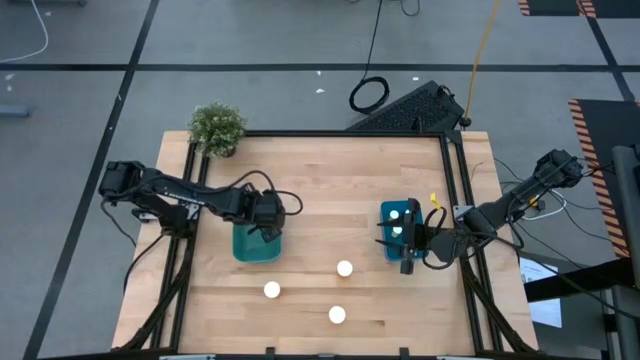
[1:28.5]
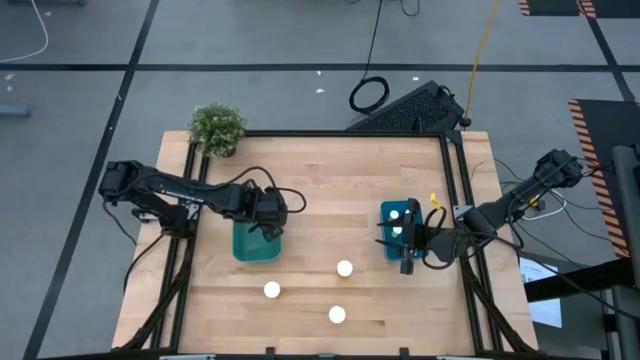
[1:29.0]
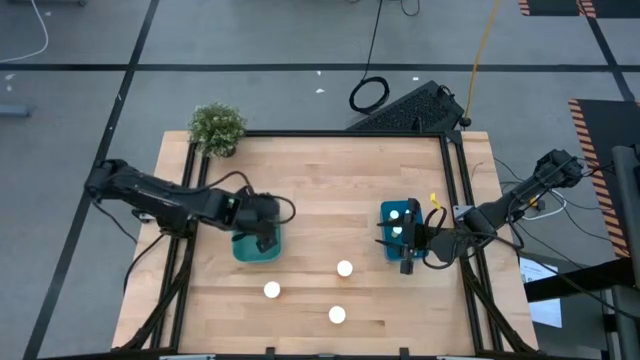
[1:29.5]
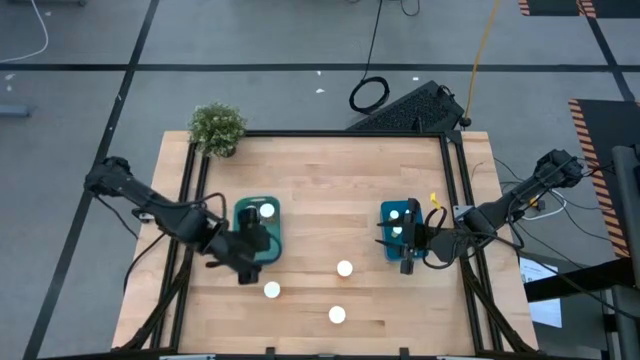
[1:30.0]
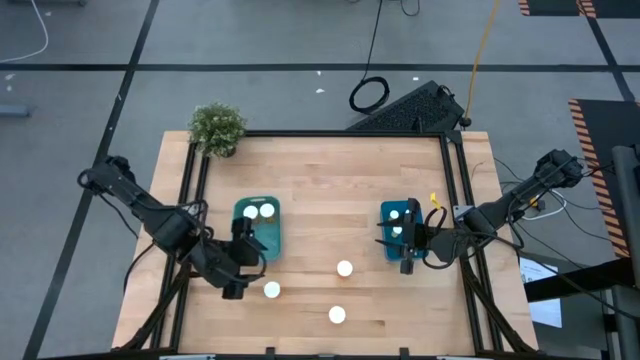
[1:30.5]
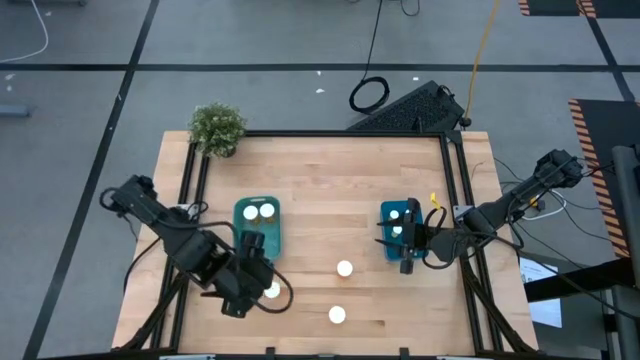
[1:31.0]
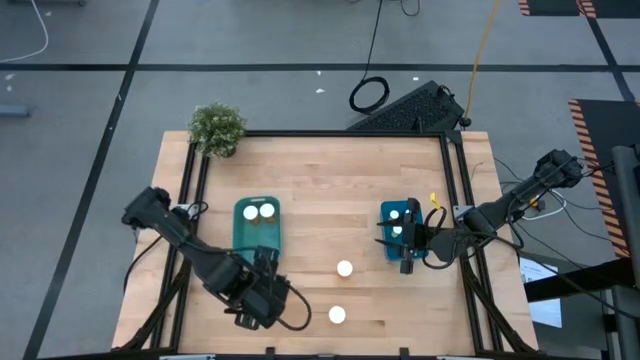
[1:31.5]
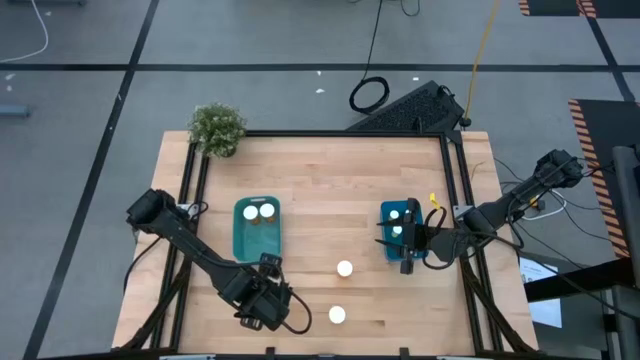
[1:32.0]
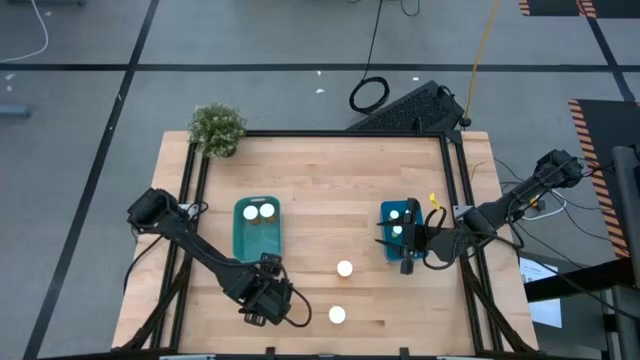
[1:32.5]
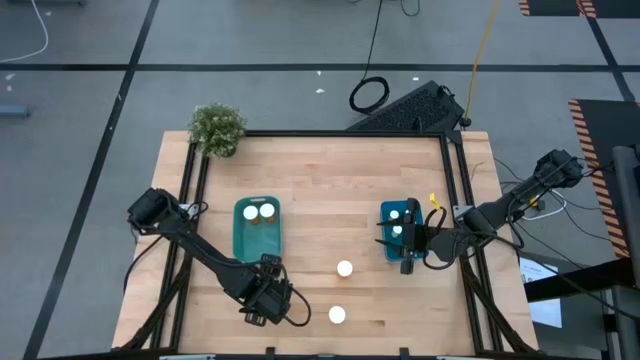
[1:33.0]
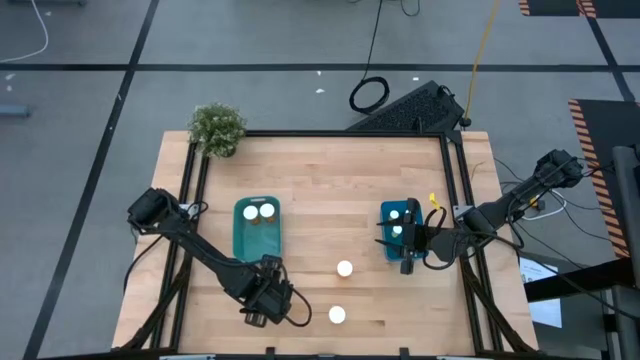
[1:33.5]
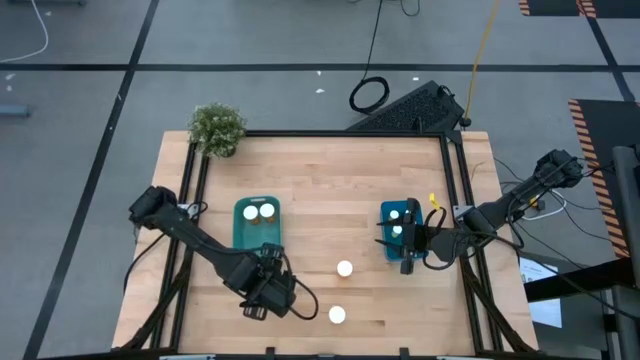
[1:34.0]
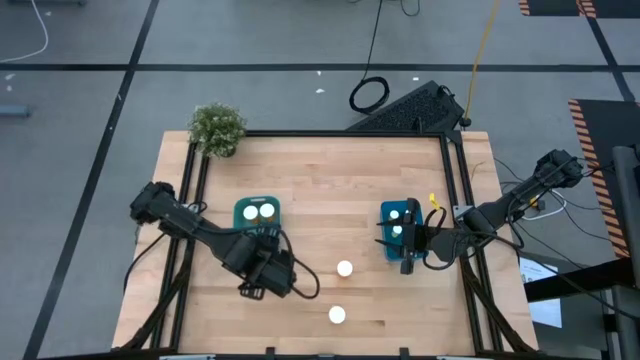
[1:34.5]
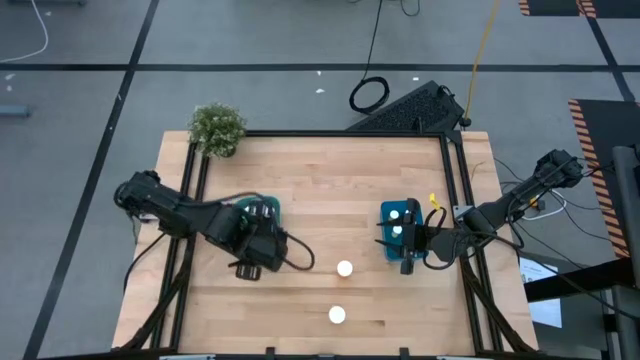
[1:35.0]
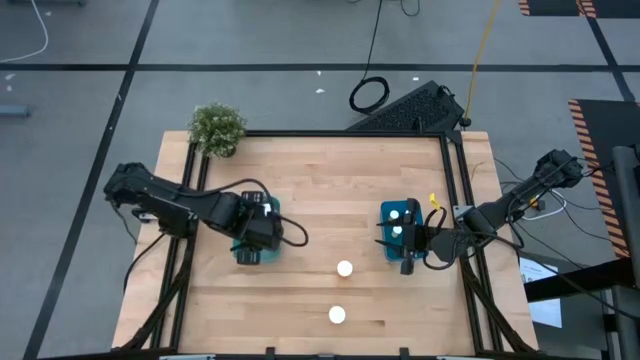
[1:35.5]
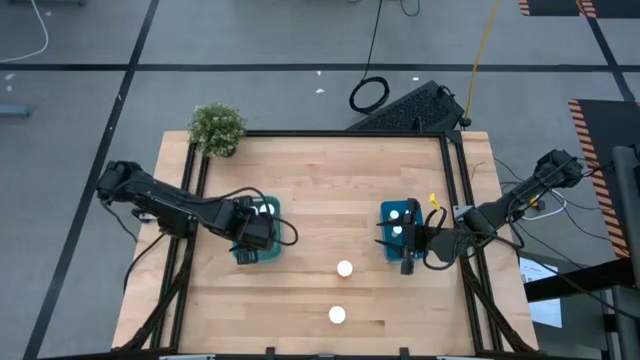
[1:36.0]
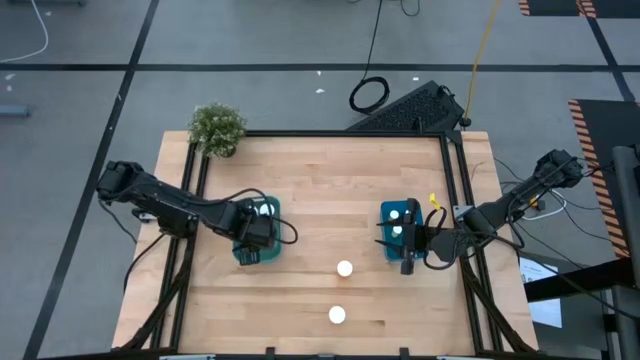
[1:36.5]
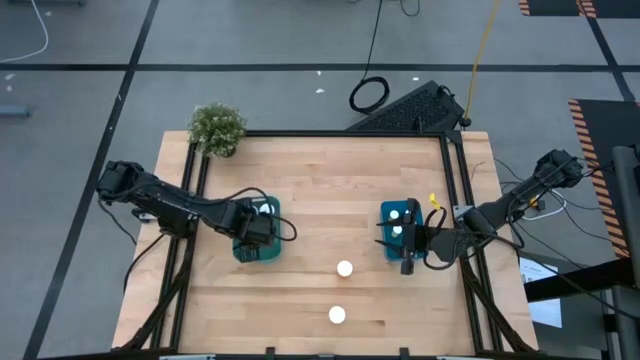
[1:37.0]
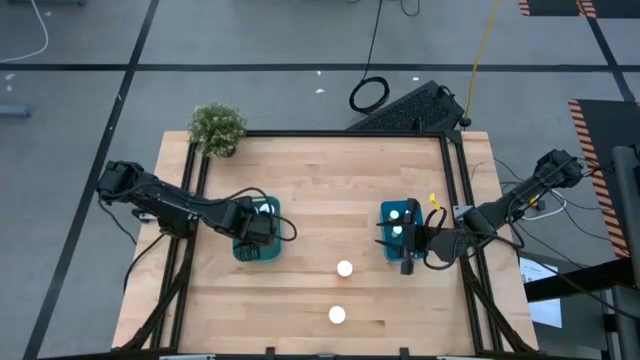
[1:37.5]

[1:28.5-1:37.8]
Task: Pick and place medicine bottles into bin by pill shape (circle, oval)
Put the big orange capsule bottle into the green bin

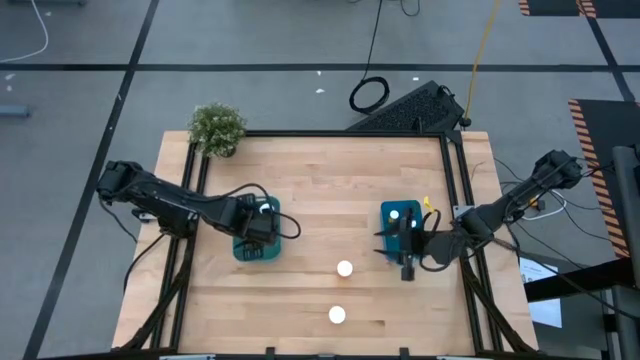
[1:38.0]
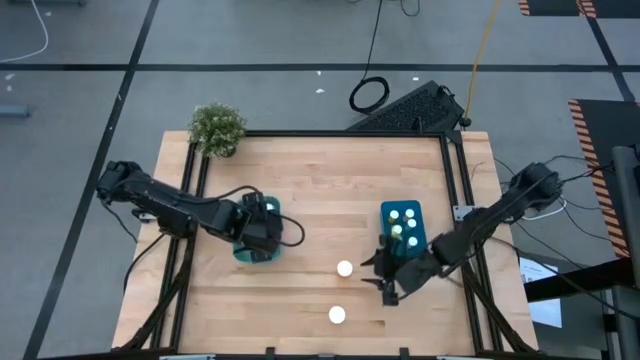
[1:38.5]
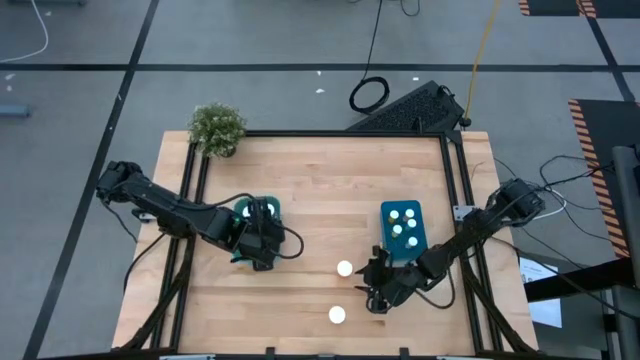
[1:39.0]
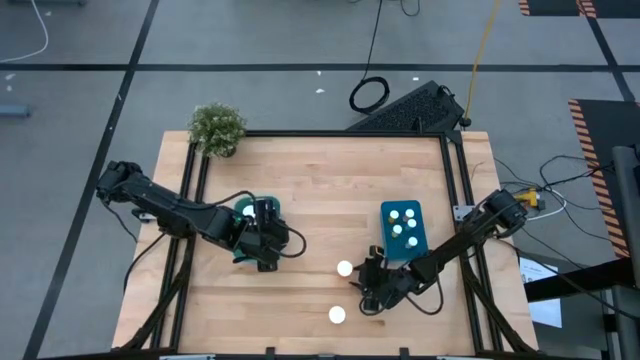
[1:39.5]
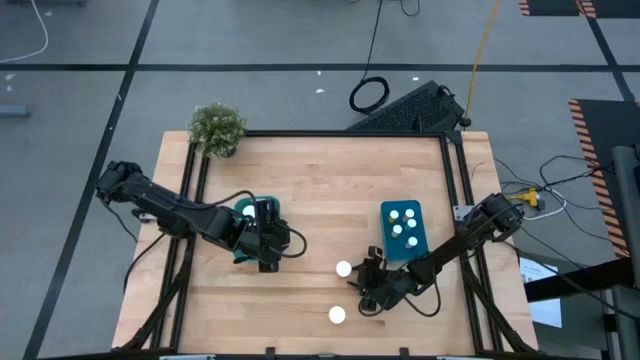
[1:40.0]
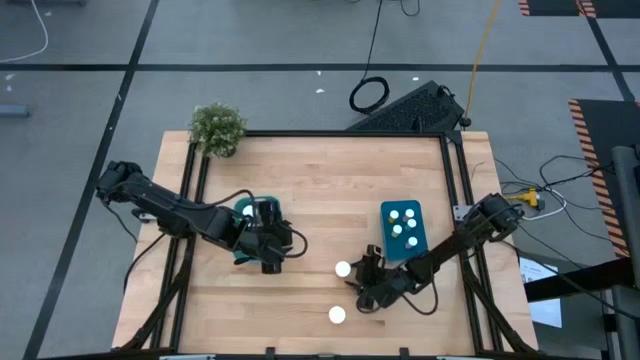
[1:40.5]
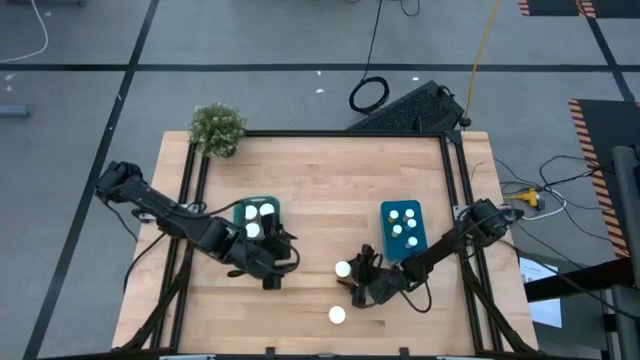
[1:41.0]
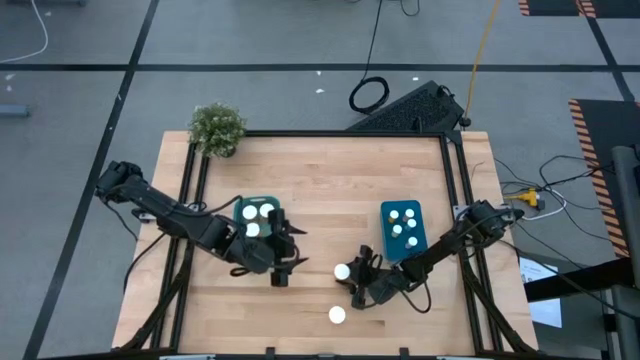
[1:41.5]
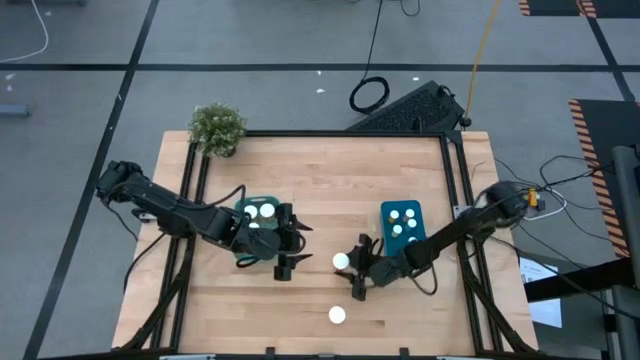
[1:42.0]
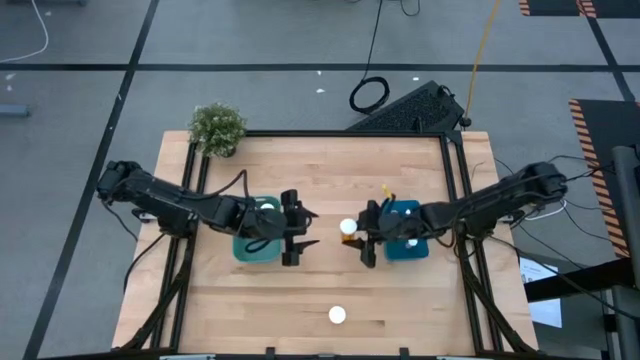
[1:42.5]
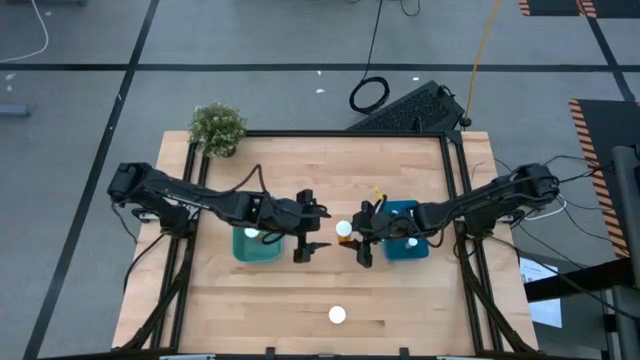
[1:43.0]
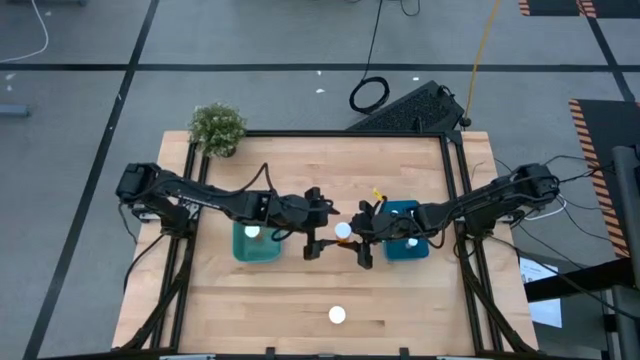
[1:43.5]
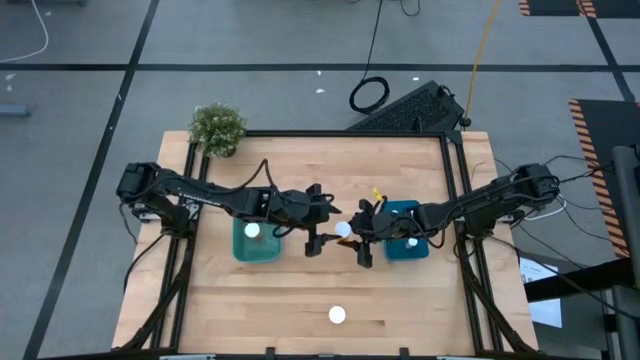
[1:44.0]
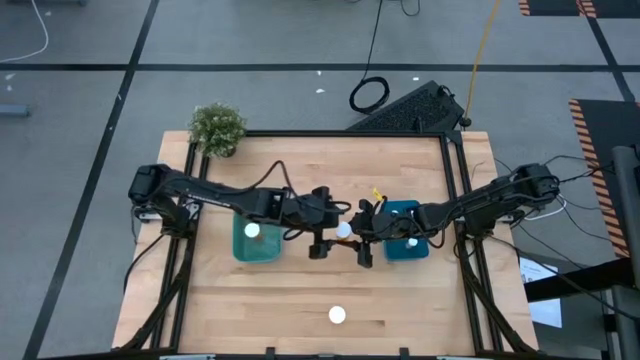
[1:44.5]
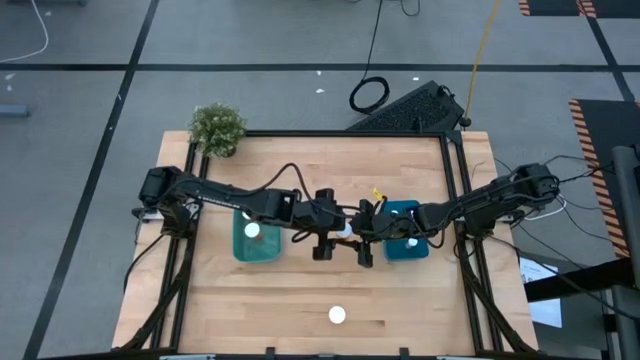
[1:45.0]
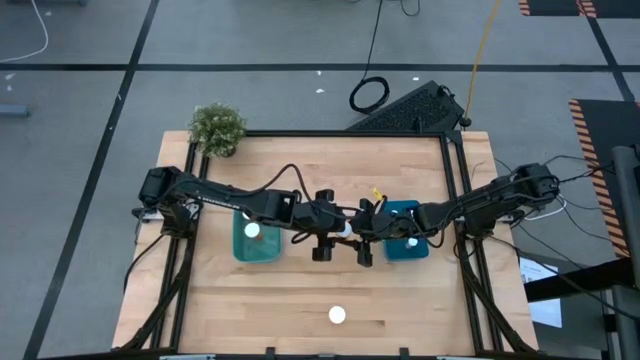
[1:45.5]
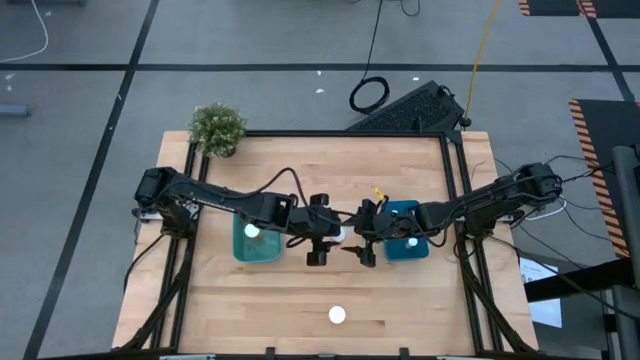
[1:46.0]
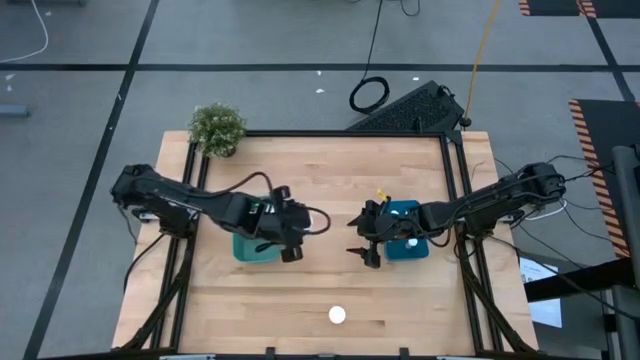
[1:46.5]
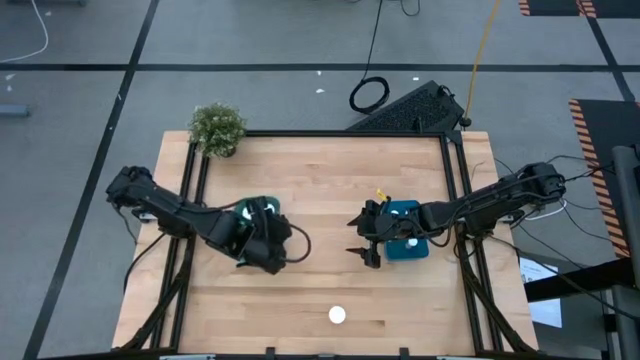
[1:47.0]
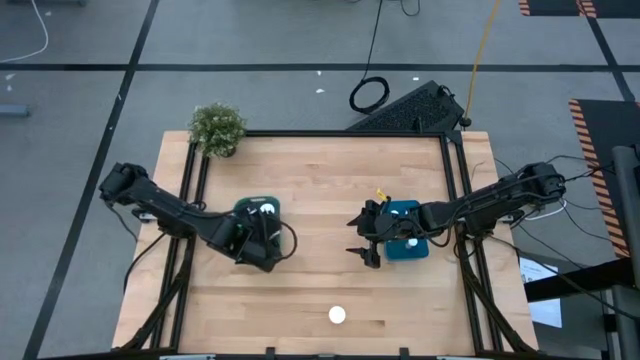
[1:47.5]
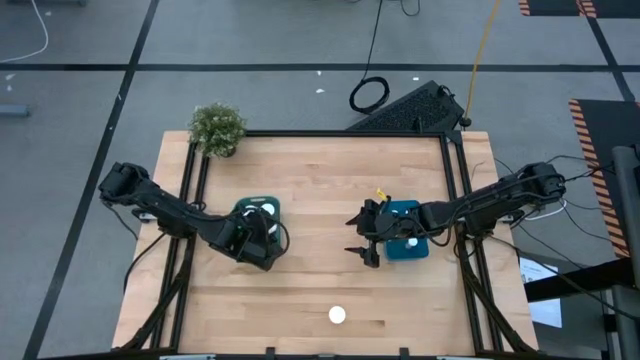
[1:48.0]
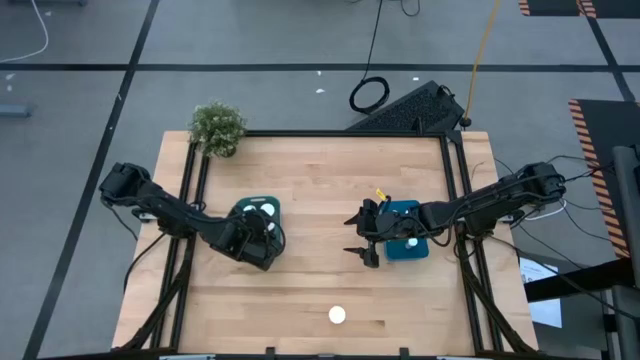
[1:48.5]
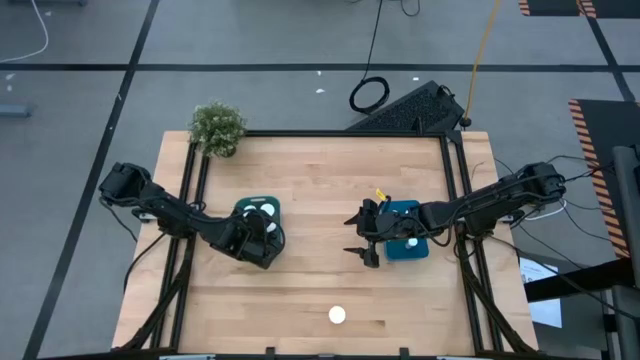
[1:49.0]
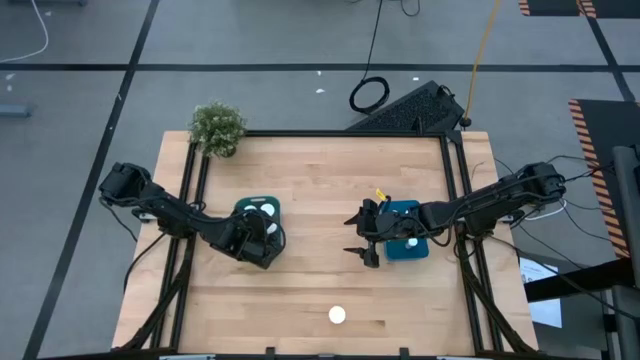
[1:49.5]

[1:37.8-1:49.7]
Put the big orange capsule bottle into the green bin

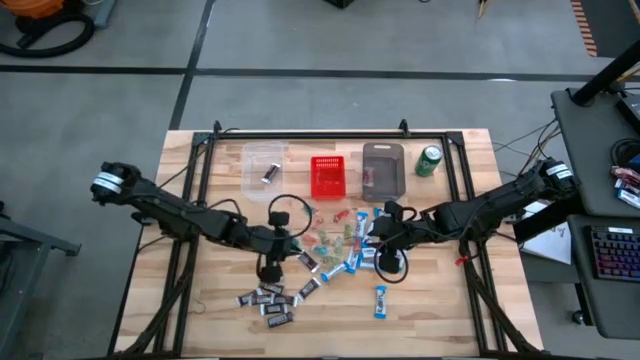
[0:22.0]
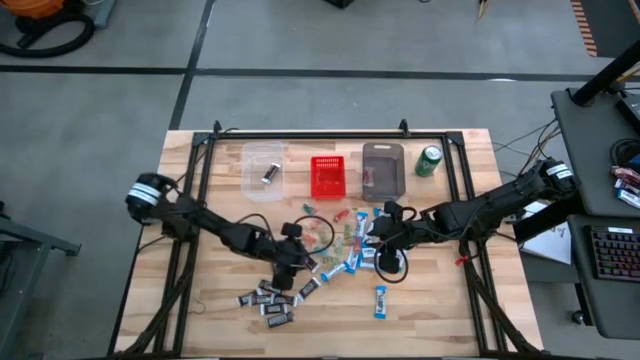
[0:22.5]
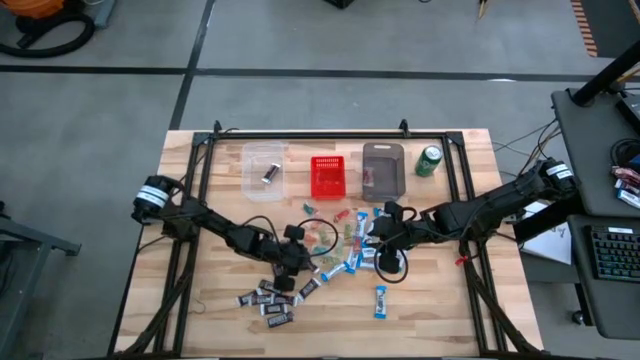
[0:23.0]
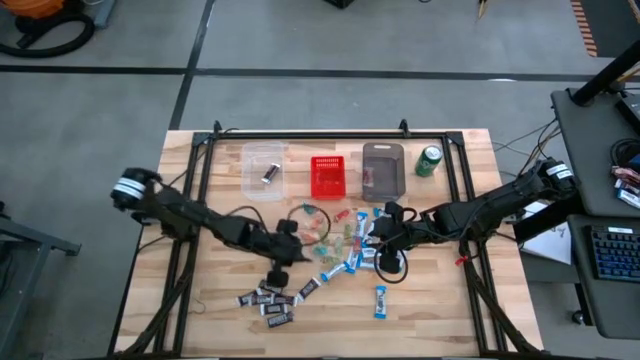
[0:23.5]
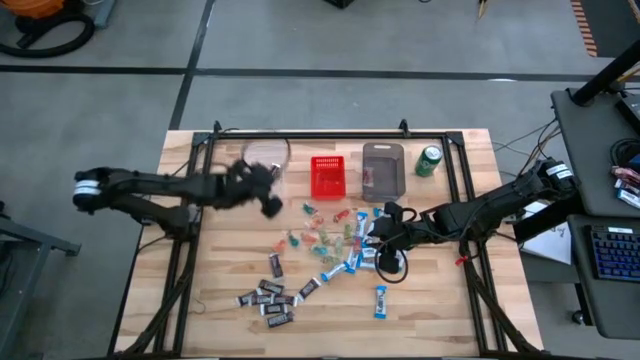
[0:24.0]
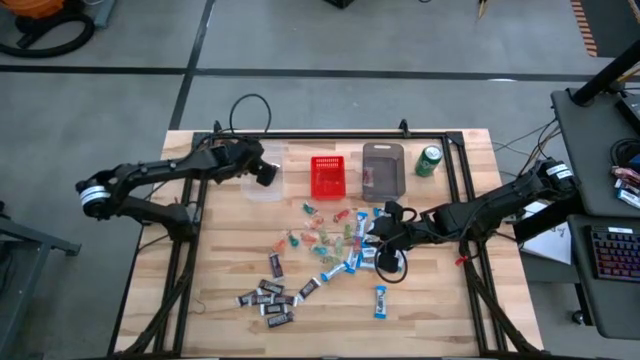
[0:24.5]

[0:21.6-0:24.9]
Task: Sort candy
Put the brown chocolate bar into the transparent bin
